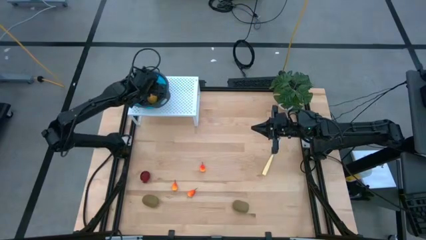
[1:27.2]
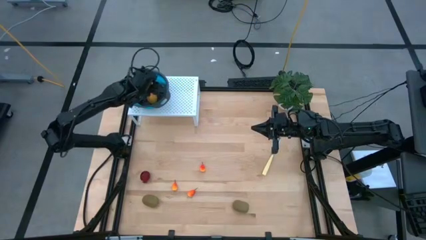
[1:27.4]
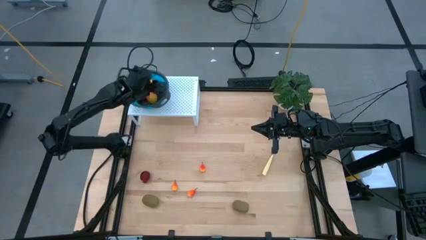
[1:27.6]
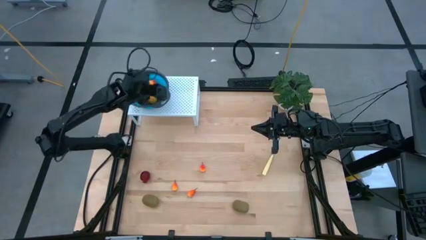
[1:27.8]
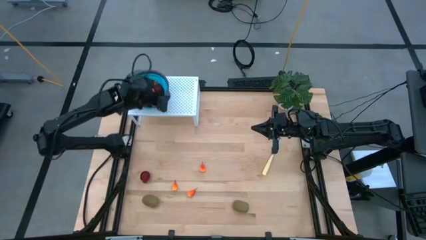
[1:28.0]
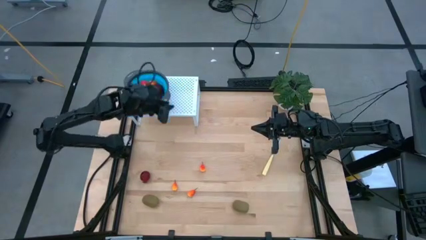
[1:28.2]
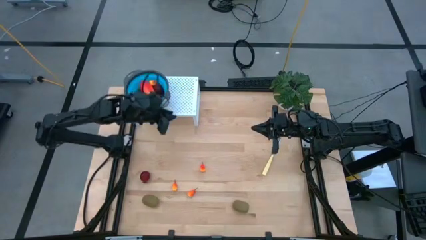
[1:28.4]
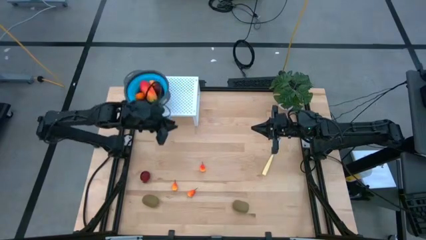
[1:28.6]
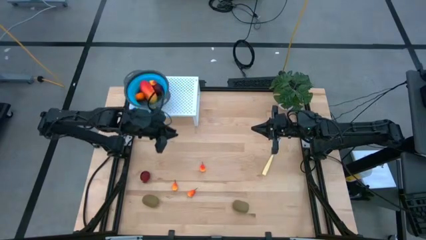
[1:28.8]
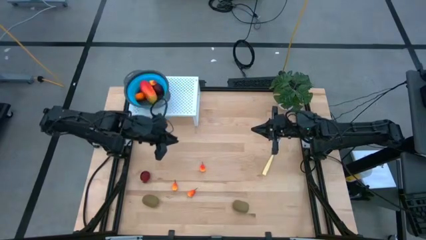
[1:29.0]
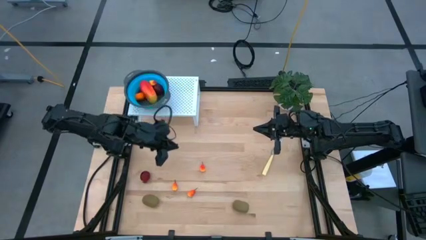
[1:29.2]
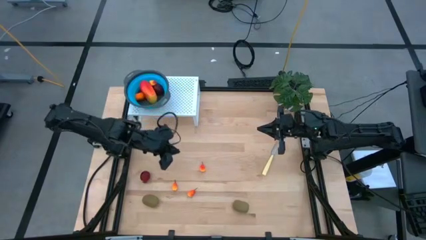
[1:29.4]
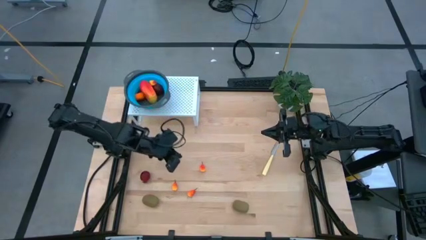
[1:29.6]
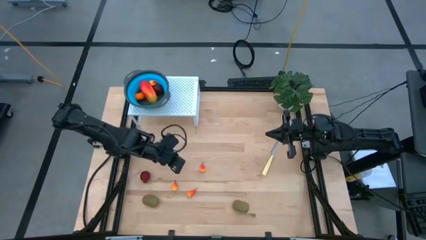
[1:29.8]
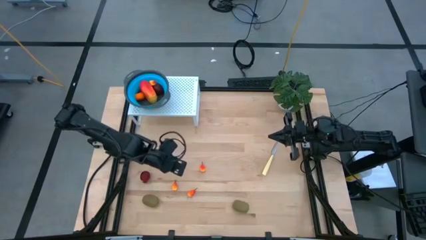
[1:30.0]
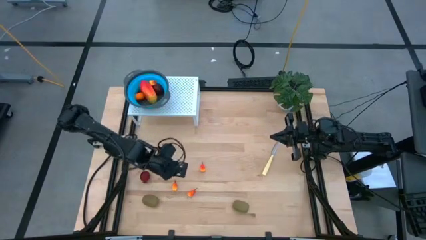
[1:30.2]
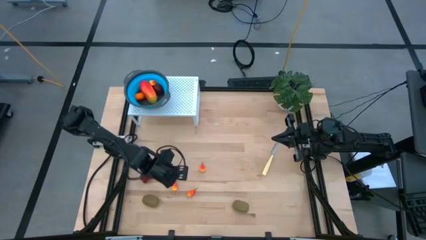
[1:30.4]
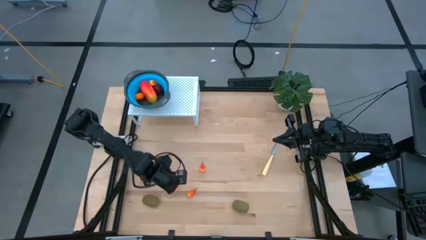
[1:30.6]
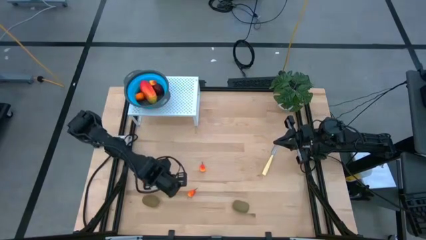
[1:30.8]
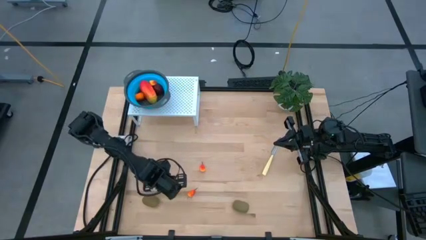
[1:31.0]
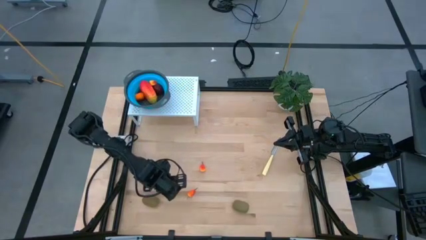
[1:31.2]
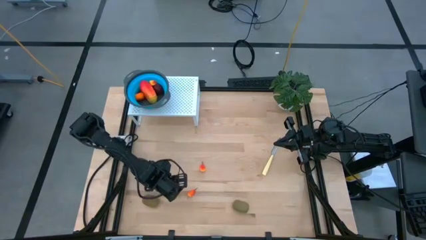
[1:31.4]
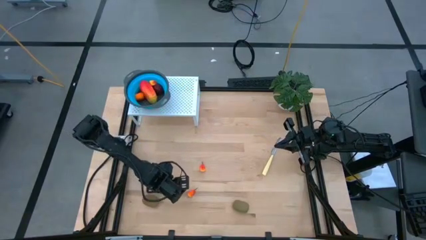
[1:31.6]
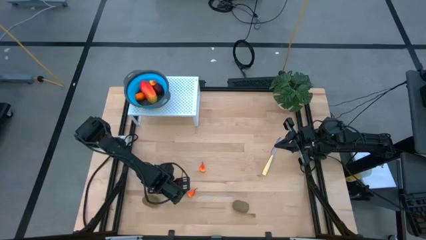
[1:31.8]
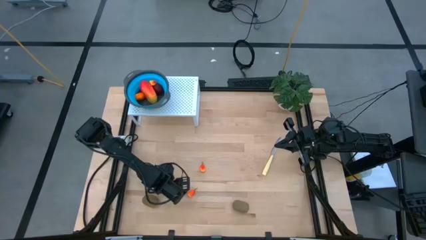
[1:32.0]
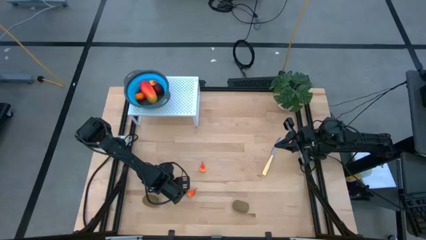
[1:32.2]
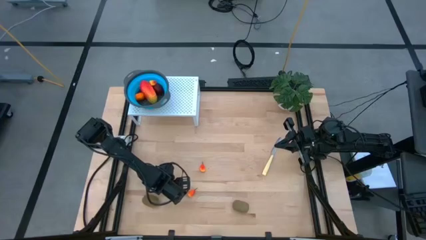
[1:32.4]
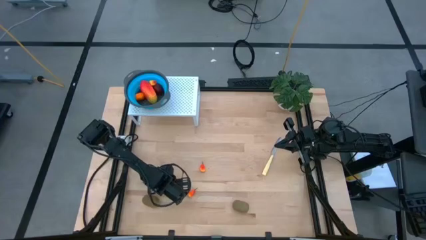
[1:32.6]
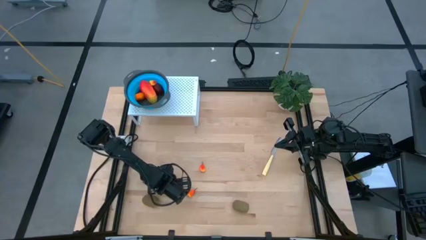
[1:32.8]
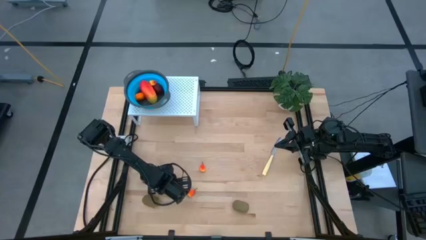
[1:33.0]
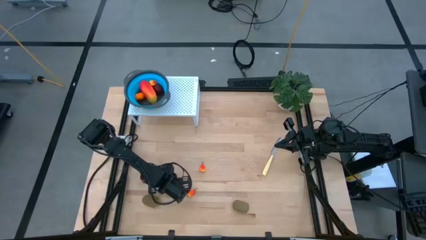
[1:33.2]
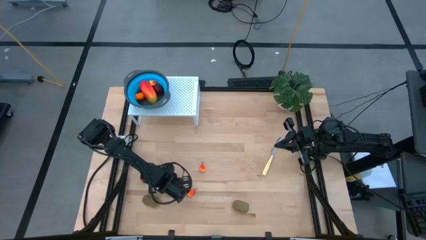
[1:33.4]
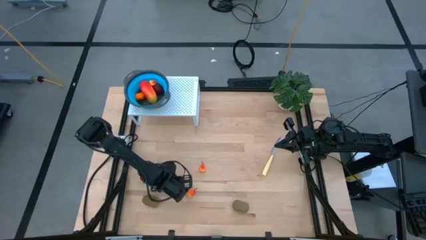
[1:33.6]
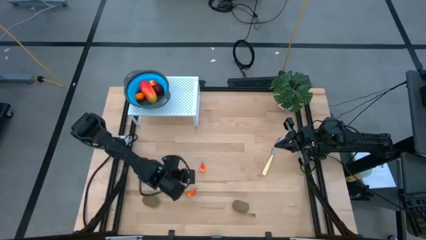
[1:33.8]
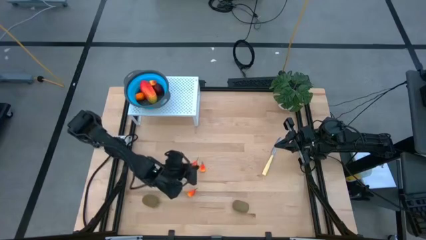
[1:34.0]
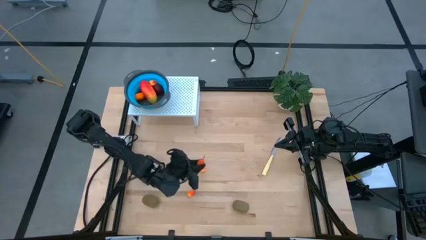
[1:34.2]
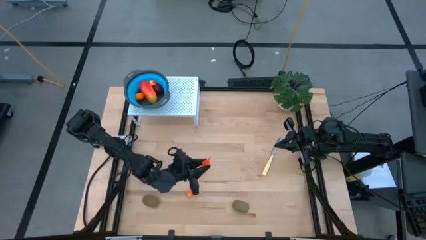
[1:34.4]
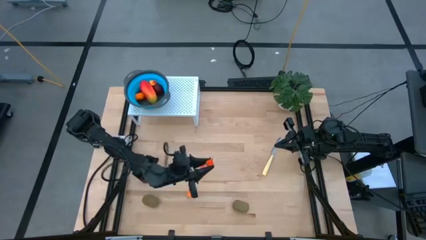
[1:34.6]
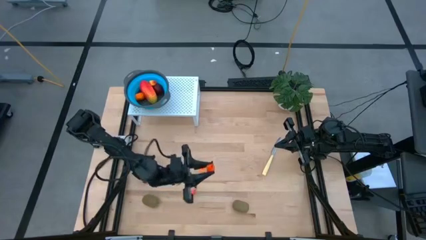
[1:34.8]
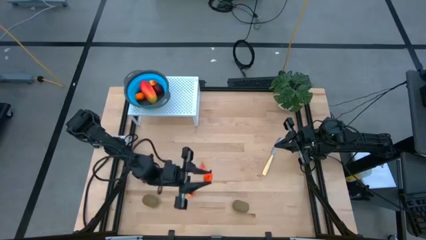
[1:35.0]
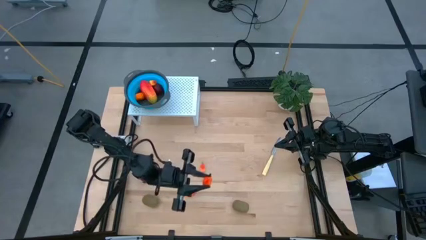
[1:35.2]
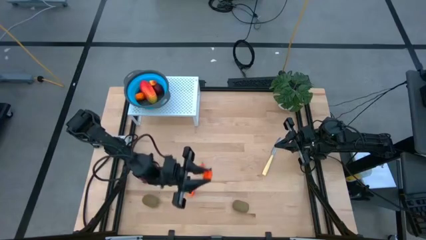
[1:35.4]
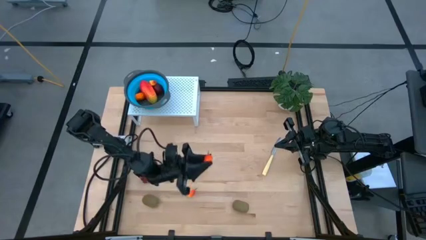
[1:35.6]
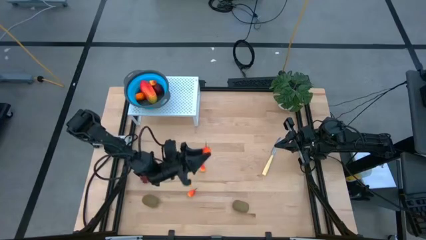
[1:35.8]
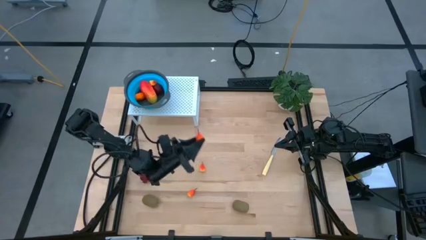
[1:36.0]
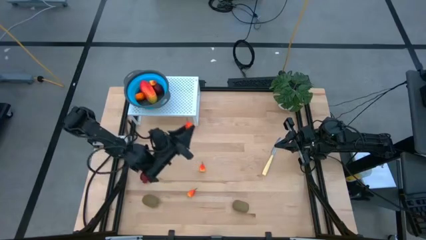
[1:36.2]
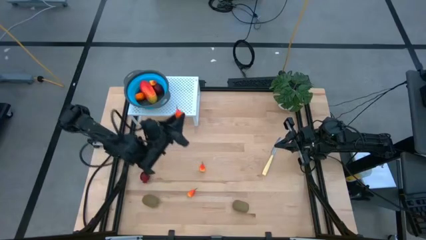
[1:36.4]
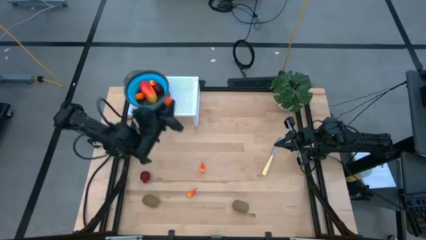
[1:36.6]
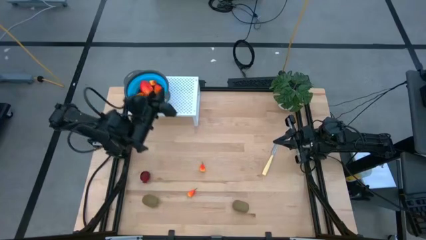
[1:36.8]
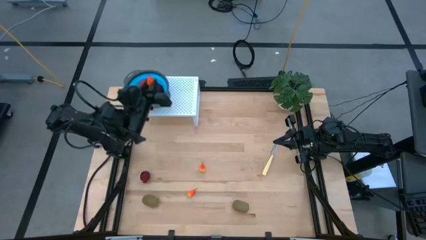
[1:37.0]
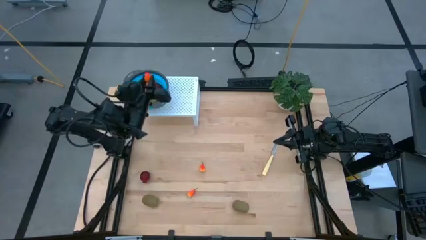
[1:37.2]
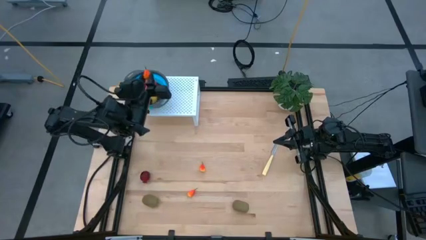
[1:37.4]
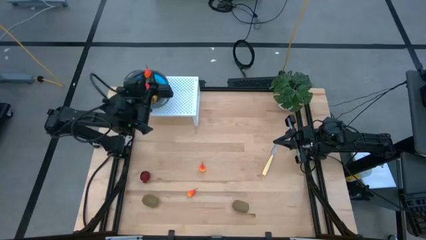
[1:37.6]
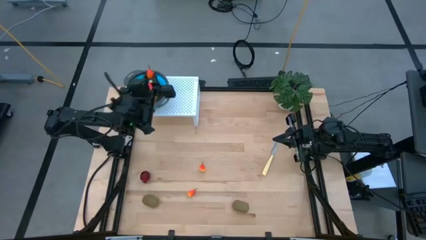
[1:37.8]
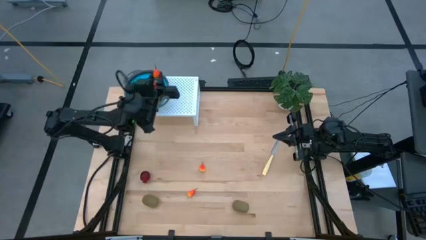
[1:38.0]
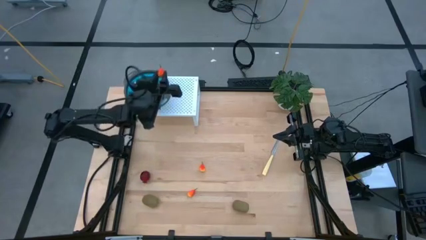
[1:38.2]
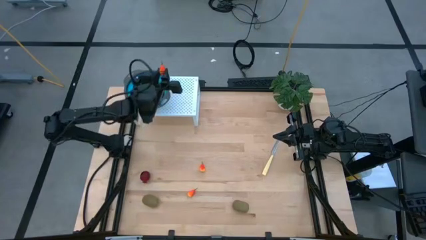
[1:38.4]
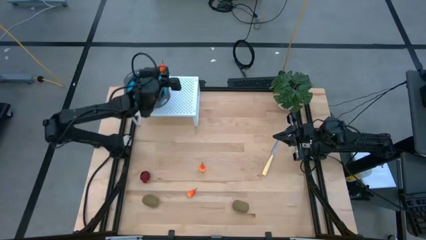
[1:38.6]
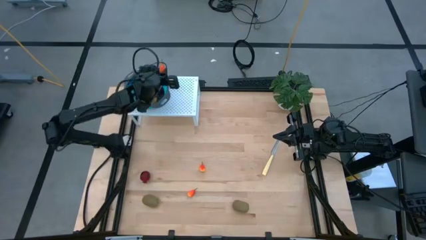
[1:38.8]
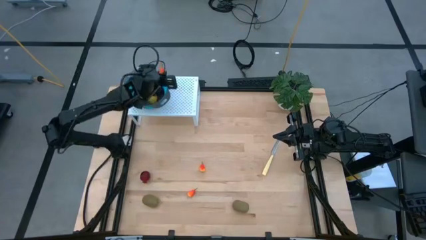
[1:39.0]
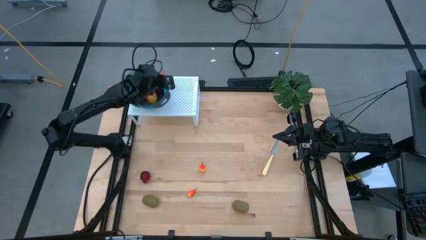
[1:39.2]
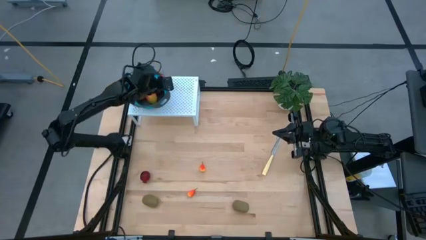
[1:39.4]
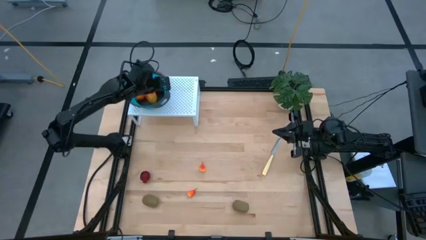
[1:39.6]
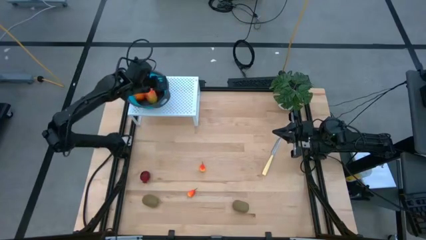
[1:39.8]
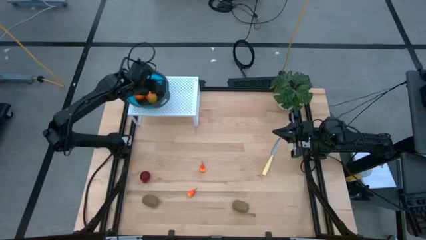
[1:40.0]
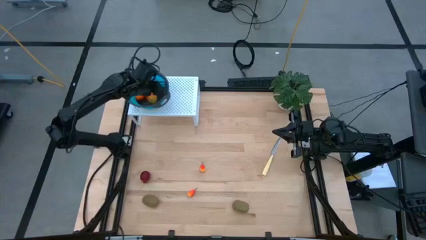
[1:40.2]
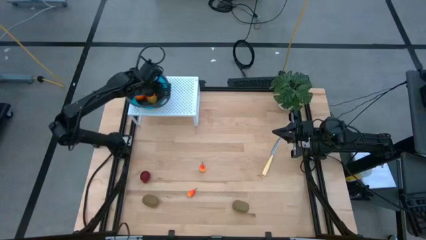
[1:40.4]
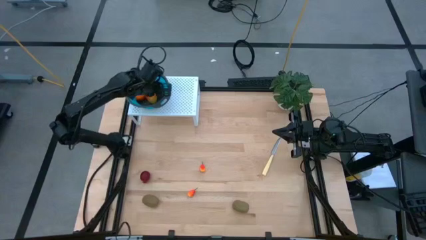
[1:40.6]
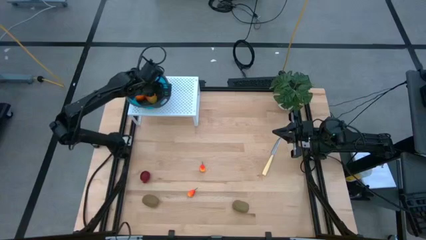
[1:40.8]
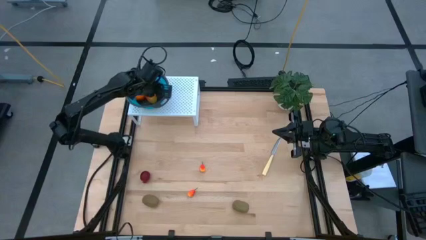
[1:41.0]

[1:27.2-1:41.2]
Task: Pick & Place Fruit
Put the bottom left peach into the blue strainer bowl on the shelf

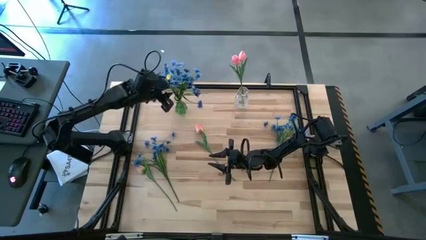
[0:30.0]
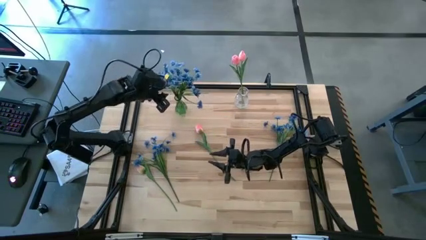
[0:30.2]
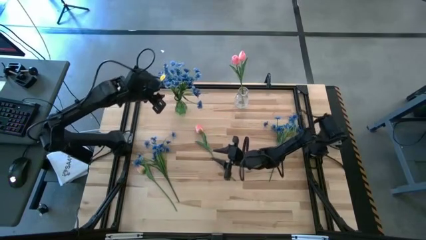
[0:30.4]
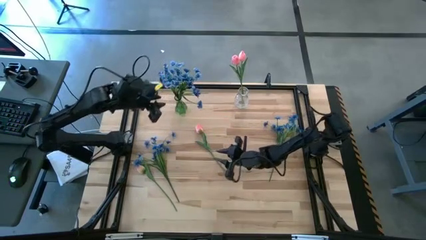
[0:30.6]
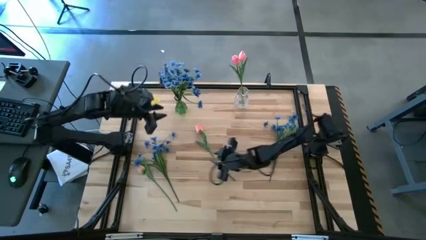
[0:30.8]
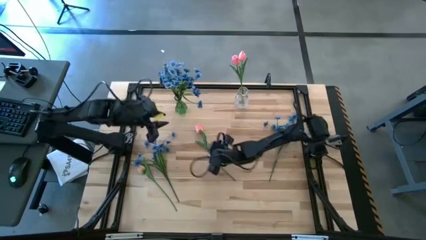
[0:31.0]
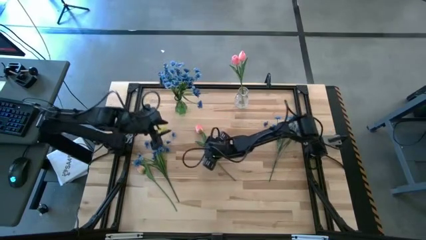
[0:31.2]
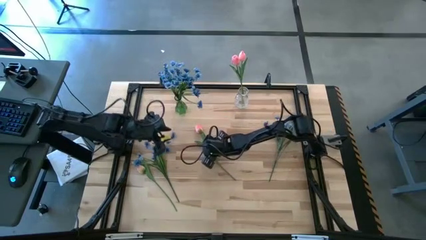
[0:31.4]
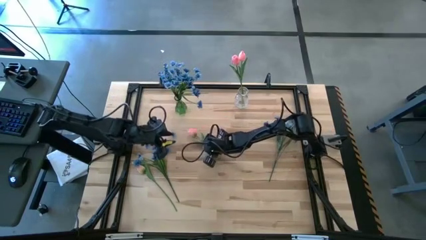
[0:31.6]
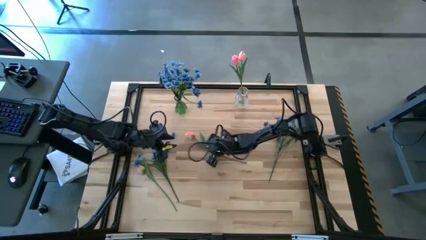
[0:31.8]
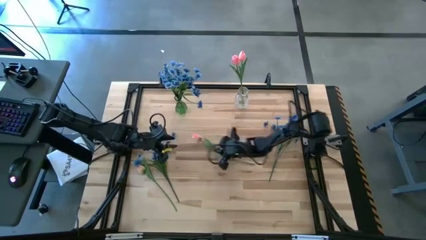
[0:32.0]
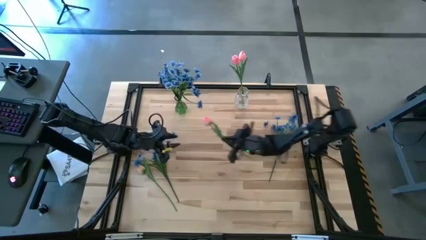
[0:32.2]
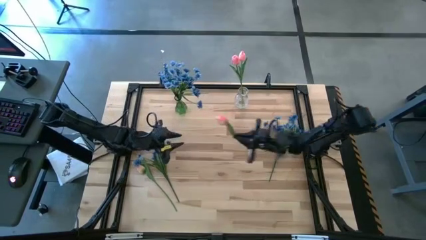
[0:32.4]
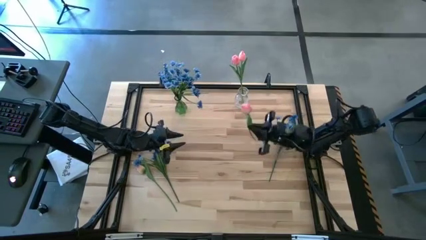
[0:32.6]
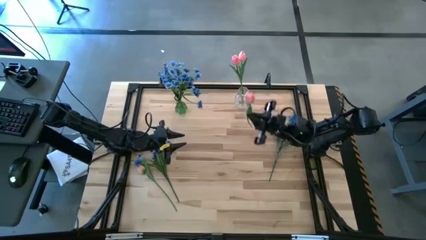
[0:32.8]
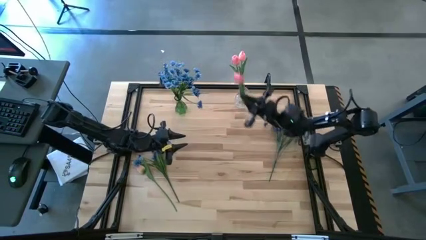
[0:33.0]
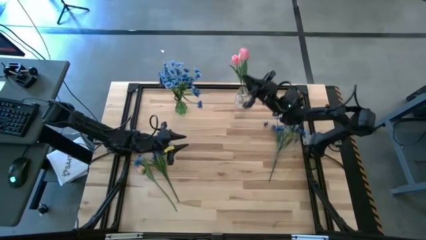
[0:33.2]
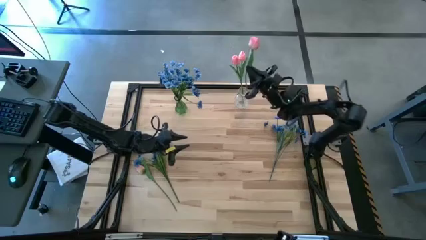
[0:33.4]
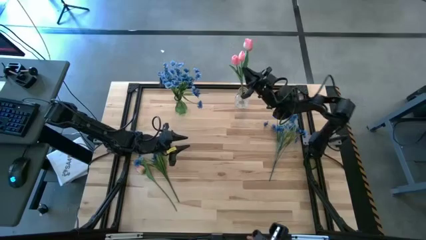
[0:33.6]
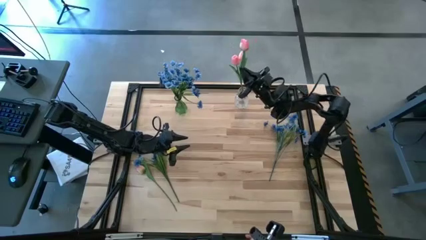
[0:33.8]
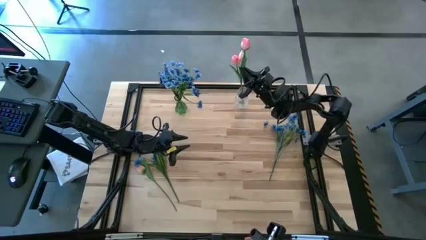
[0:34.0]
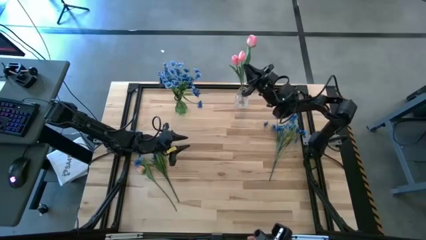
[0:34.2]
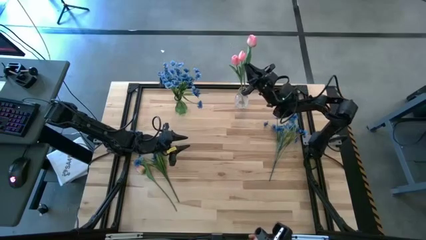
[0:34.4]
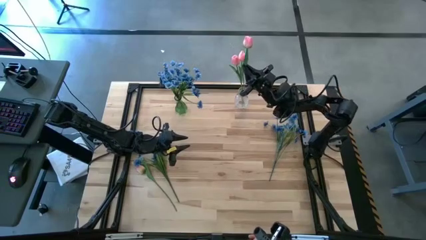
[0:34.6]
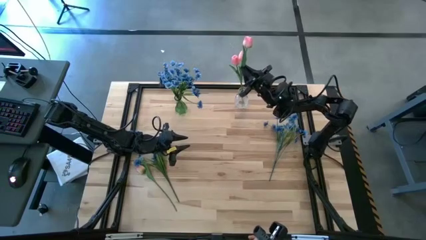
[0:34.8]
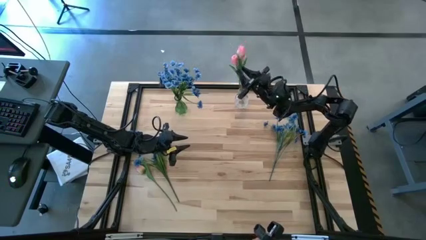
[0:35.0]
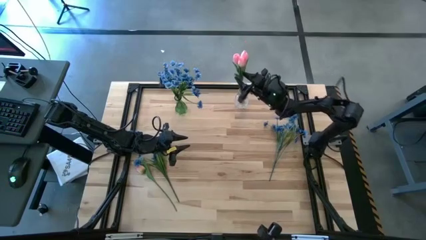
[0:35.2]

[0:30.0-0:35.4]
Task: Sort flowers into vase by color
Put the right pink tulip into the transparent vase
